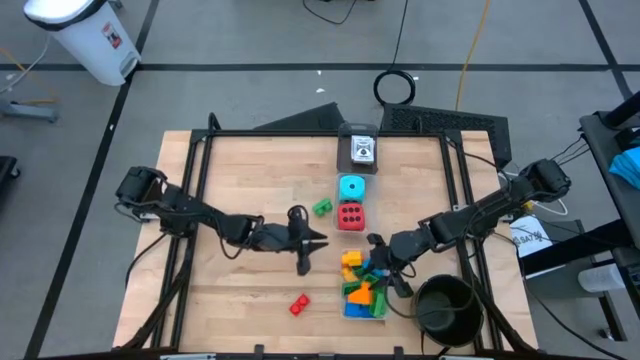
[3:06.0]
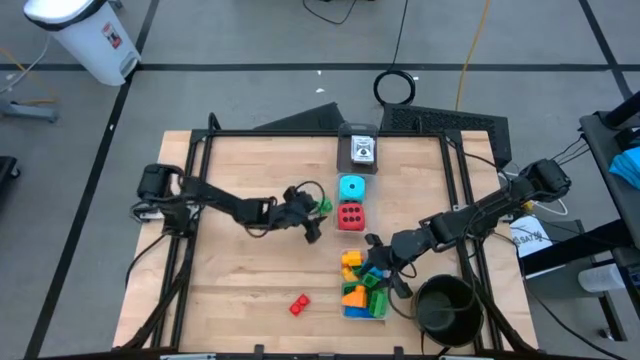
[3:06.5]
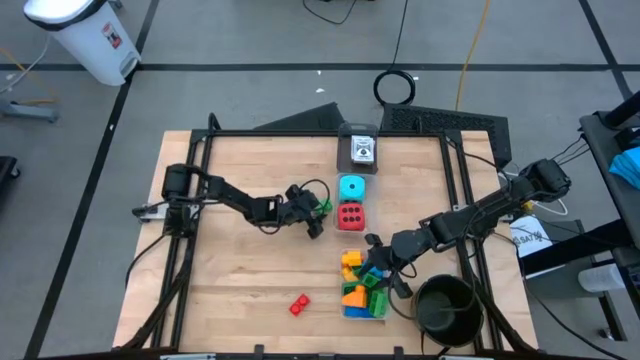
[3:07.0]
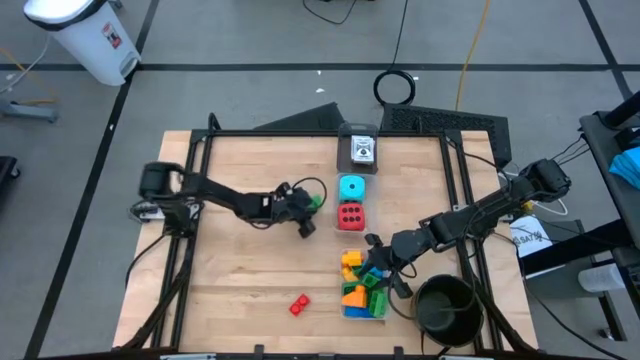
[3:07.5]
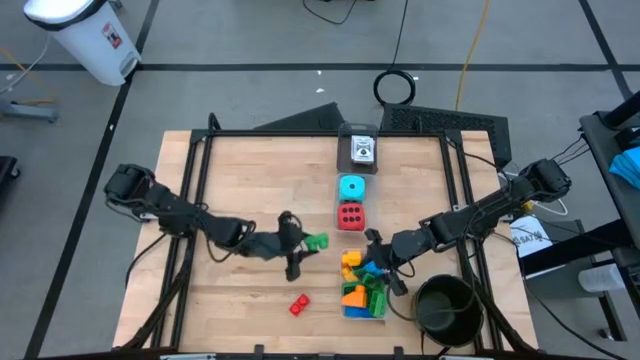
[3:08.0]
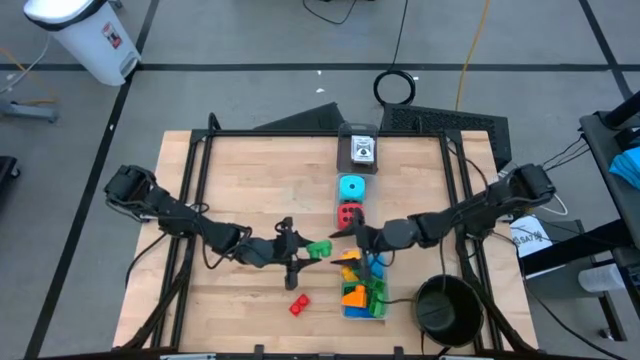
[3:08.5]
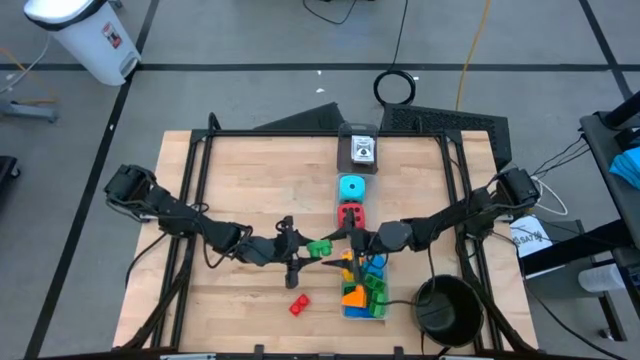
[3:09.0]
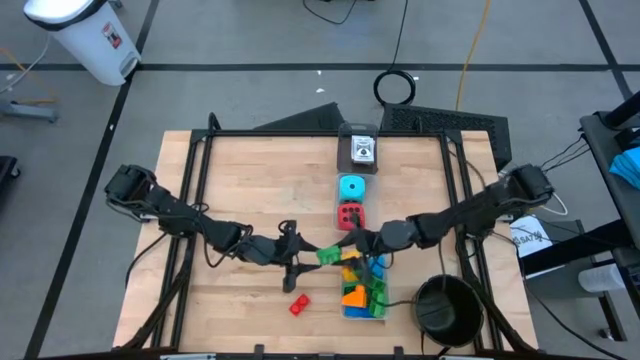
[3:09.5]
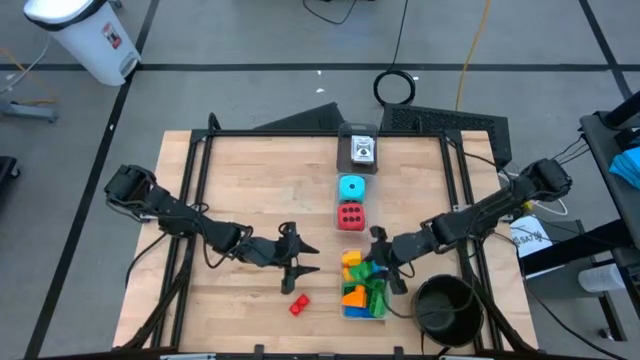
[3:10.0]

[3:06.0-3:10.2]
Task: Pick & Place Toys
Put the green 2 stud game piece into the bottom transparent bin

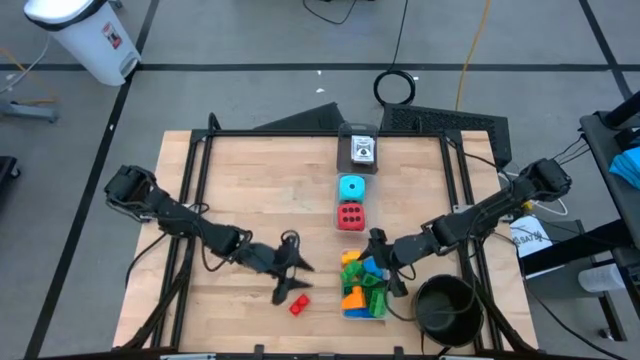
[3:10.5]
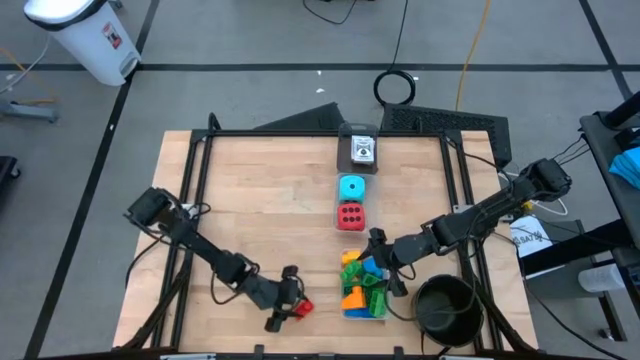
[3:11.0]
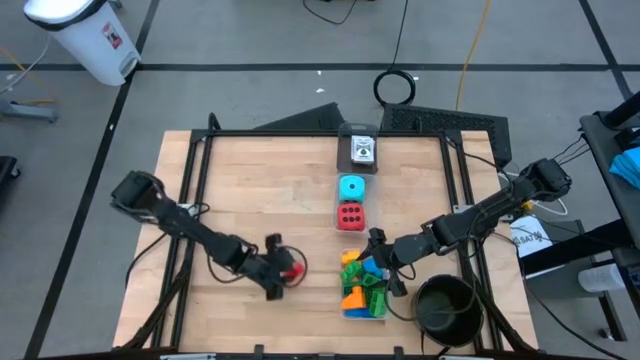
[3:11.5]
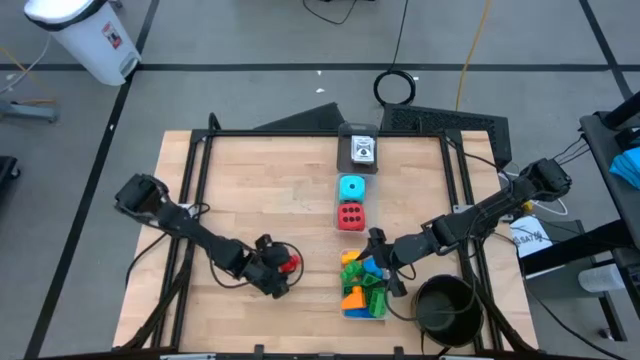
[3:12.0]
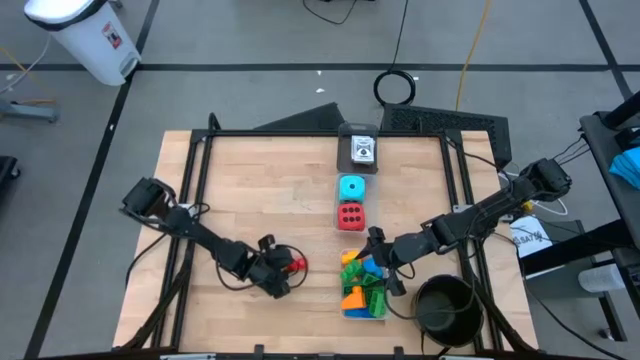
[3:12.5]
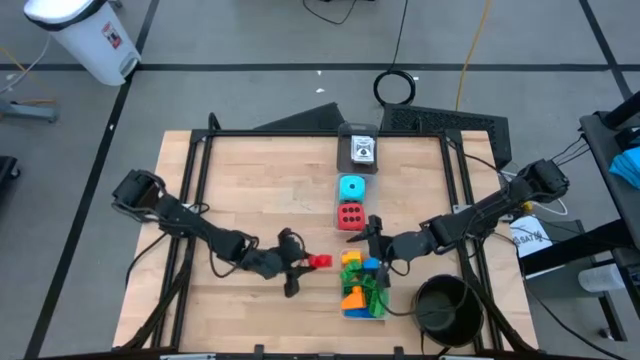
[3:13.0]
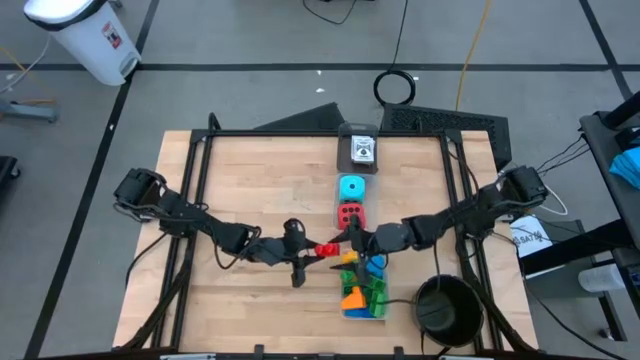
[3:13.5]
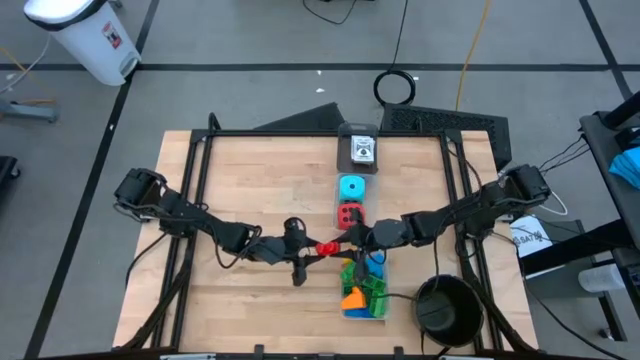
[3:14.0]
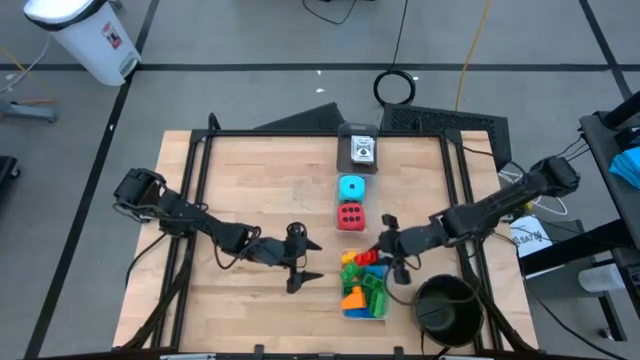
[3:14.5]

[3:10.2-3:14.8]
Put the red 2 stud game piece into the bottom transparent bin

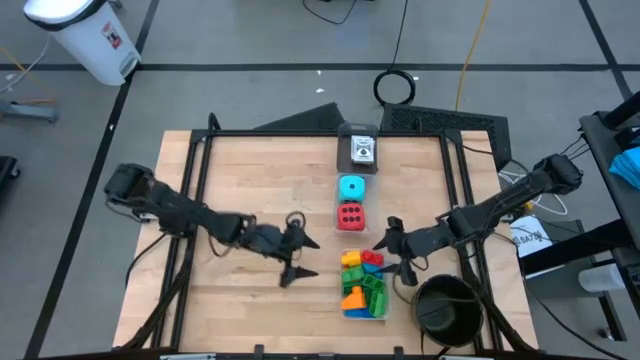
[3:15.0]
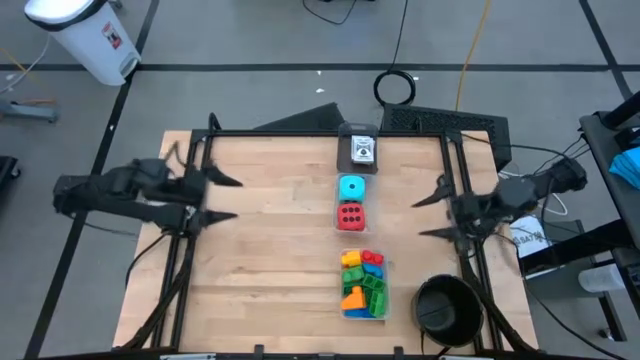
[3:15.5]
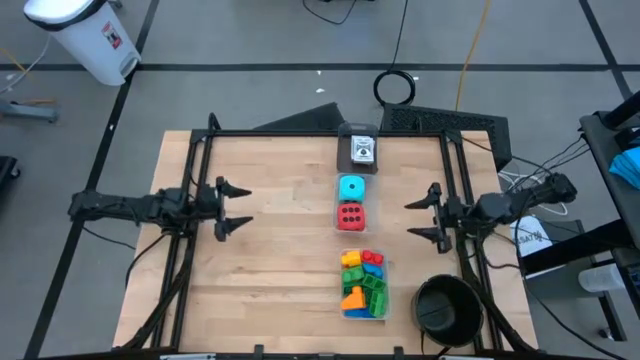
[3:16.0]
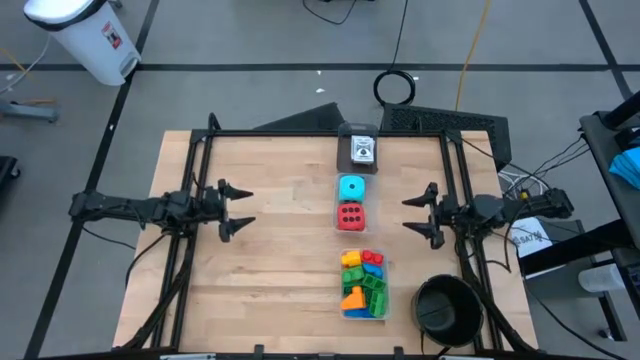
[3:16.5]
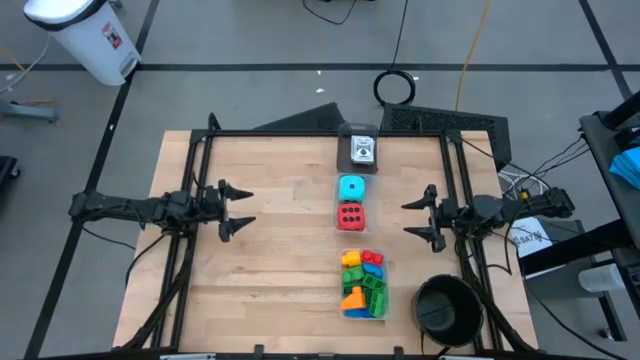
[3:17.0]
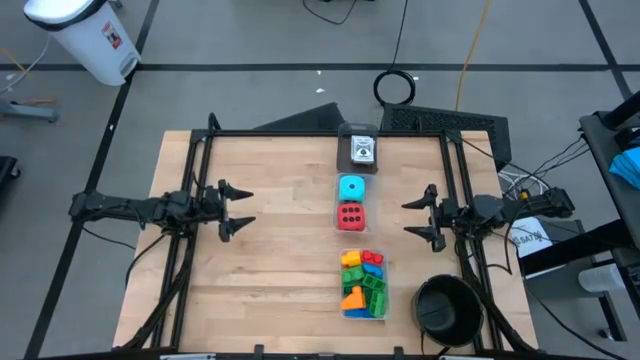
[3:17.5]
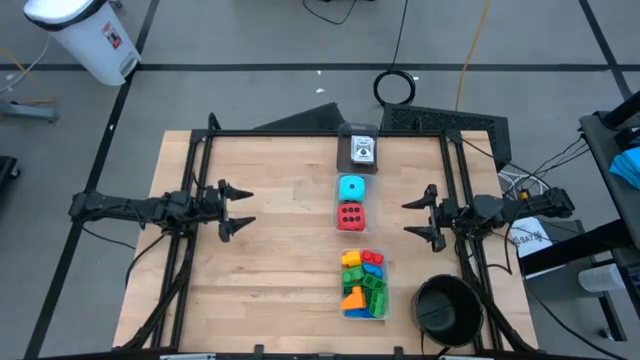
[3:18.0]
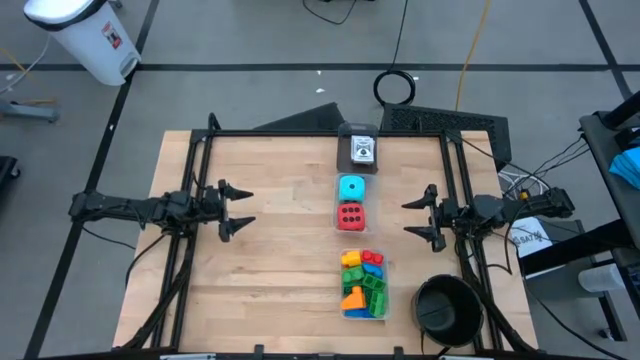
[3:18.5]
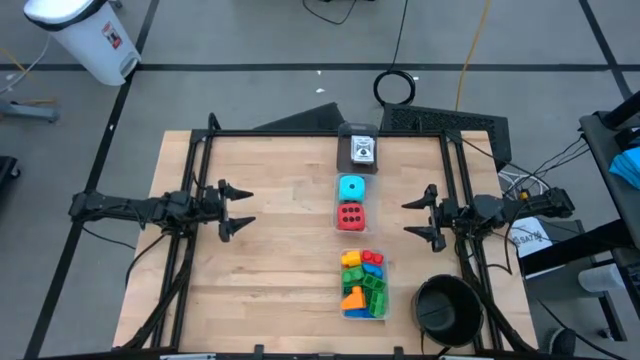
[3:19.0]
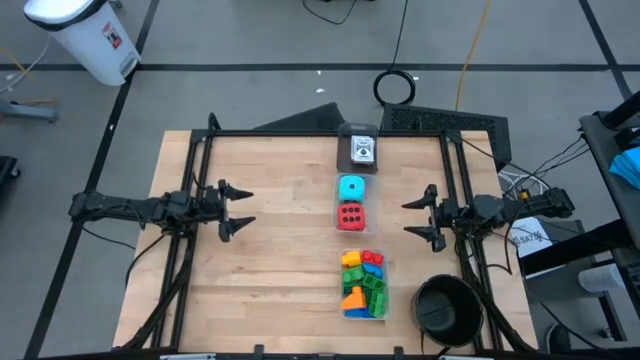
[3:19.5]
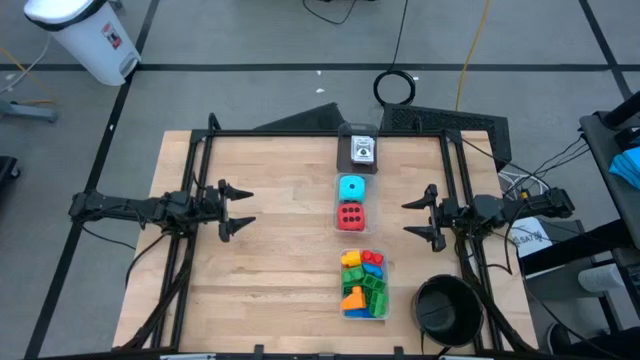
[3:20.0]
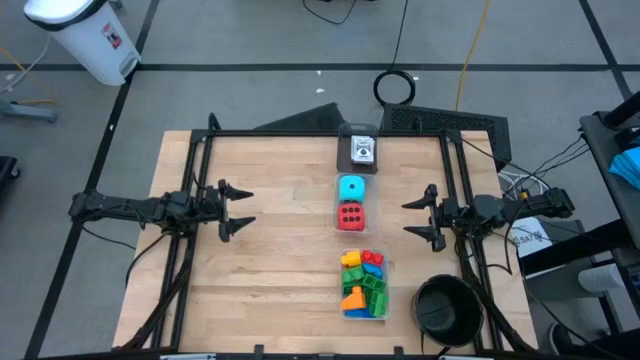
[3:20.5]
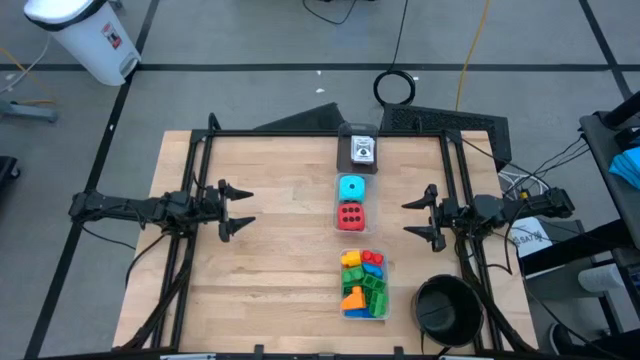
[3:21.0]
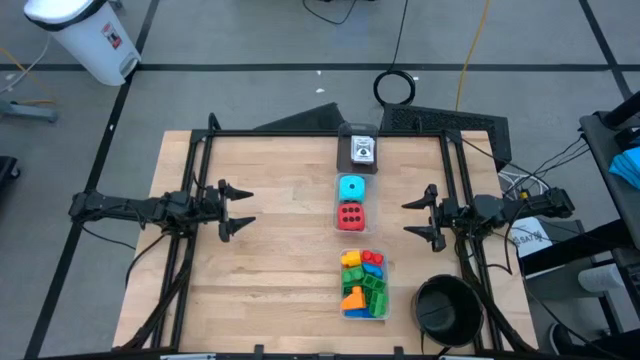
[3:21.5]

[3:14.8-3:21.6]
Return to Home Position

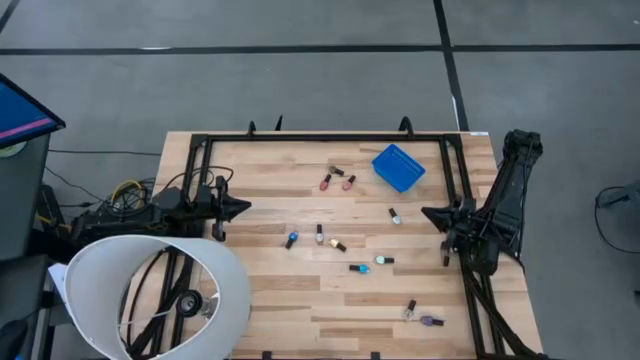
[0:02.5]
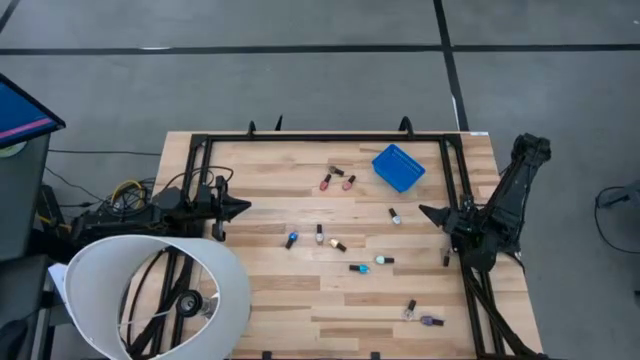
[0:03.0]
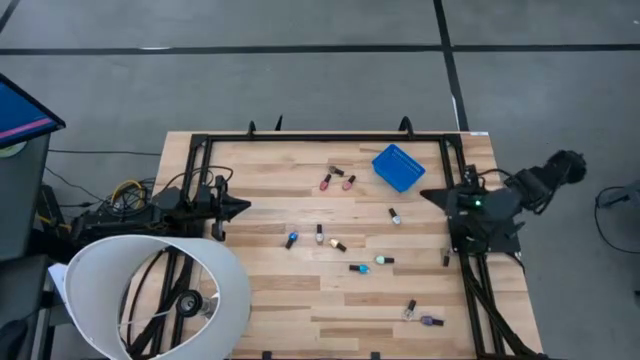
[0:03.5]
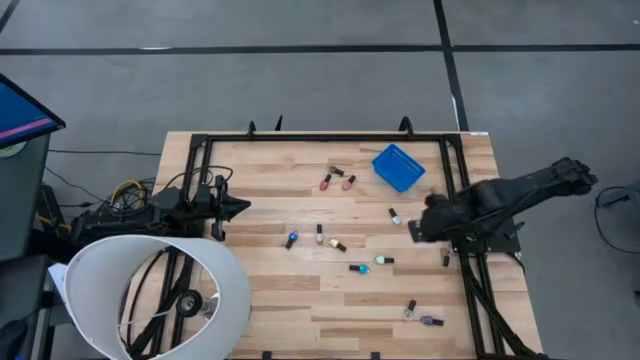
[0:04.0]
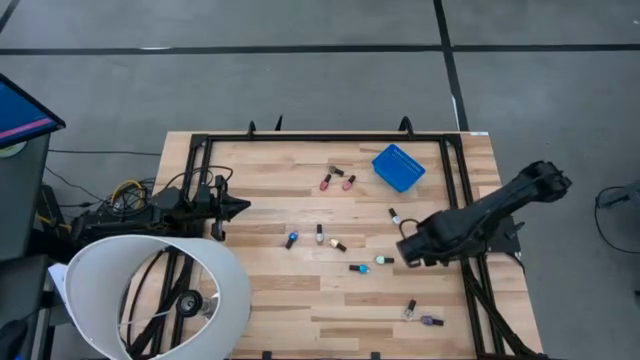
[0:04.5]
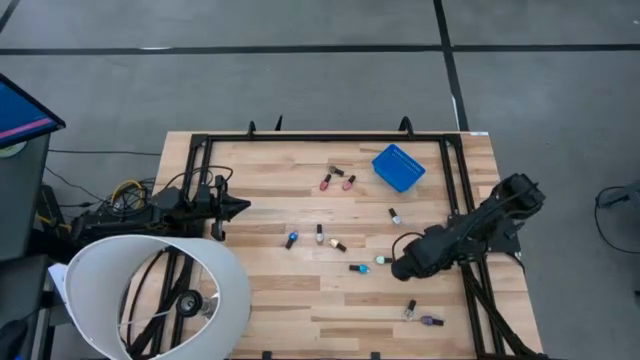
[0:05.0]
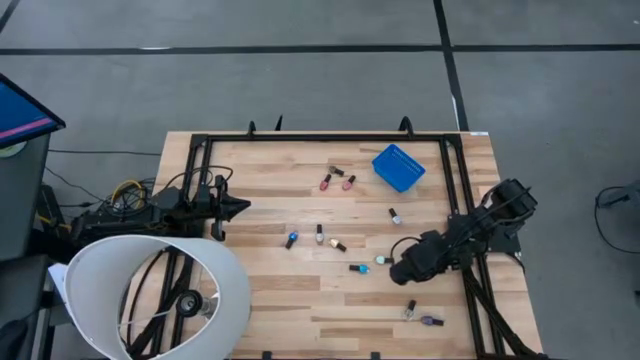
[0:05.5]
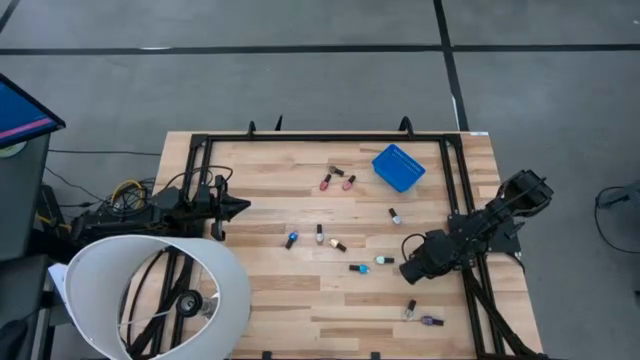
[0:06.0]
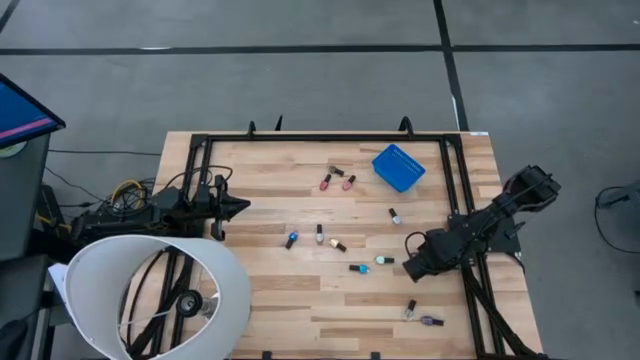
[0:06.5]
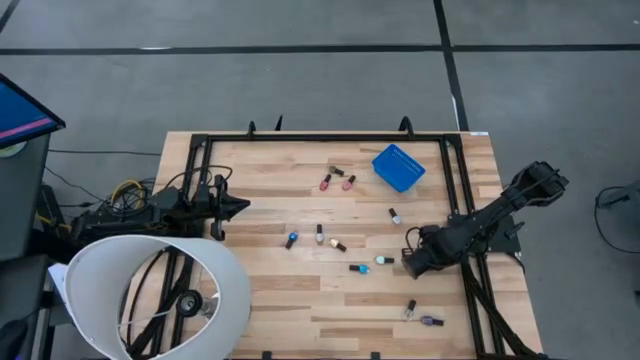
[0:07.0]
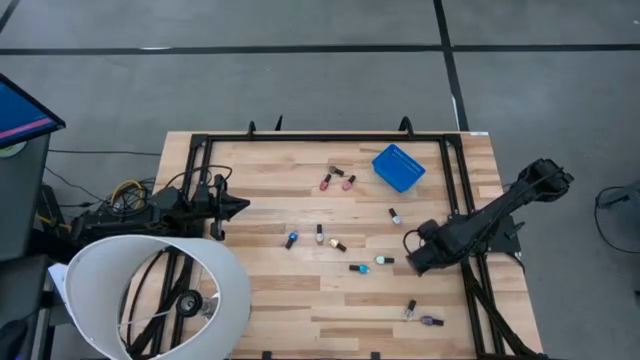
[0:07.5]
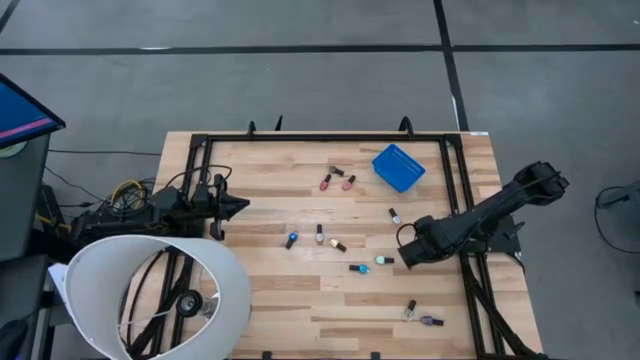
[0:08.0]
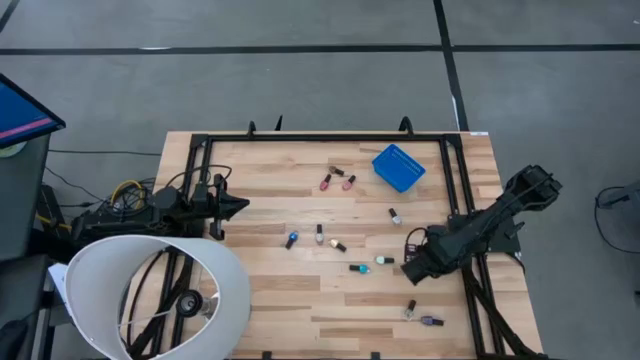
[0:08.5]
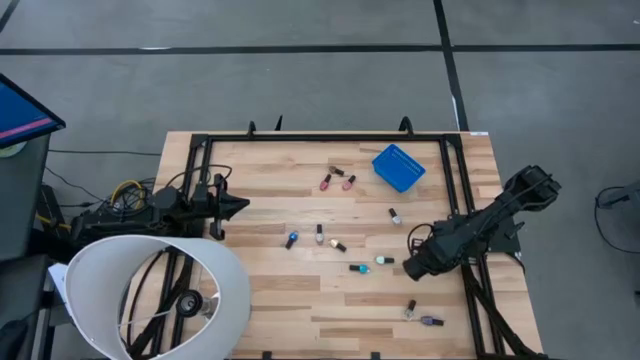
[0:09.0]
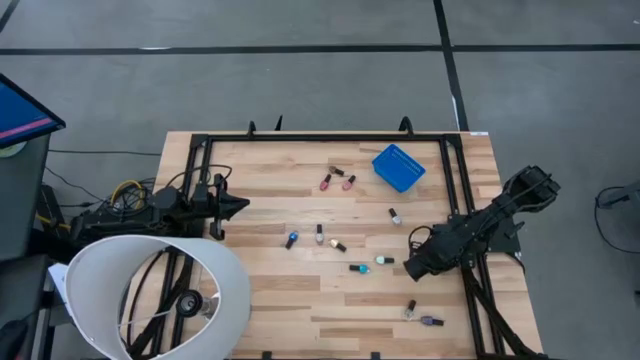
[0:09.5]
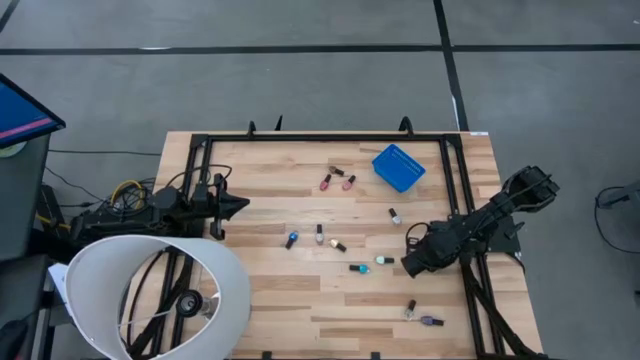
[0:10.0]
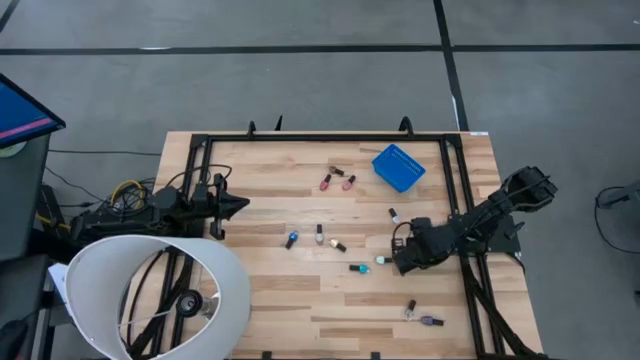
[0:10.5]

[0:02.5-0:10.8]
Task: Pick & Place Nail Polish
Put the top transparent nail polish bottle into the blue bin
